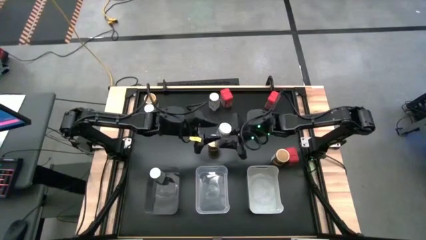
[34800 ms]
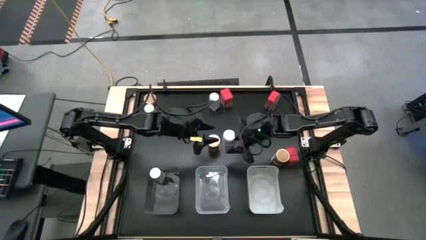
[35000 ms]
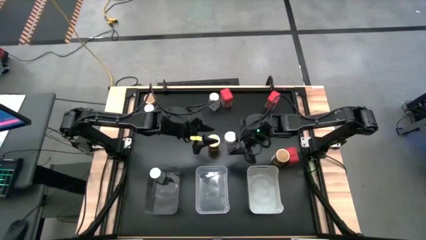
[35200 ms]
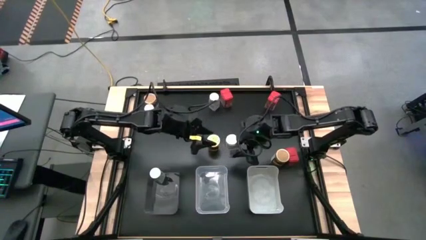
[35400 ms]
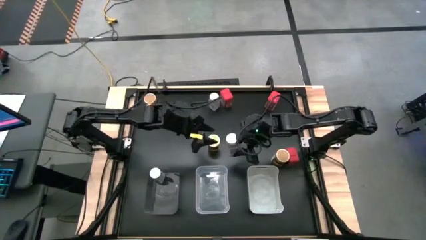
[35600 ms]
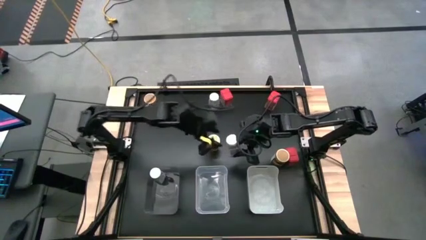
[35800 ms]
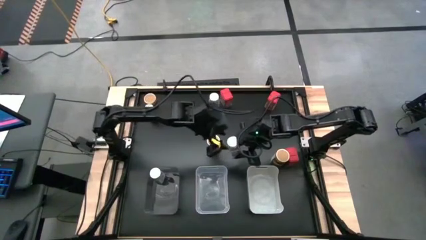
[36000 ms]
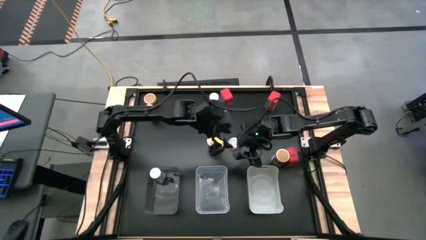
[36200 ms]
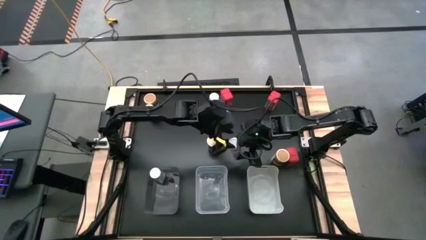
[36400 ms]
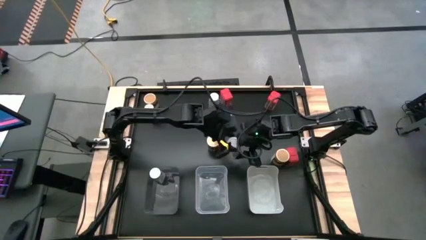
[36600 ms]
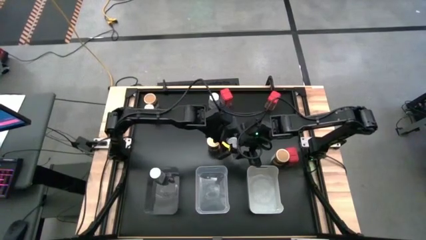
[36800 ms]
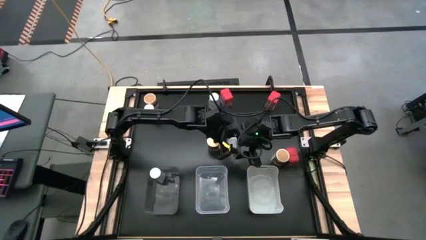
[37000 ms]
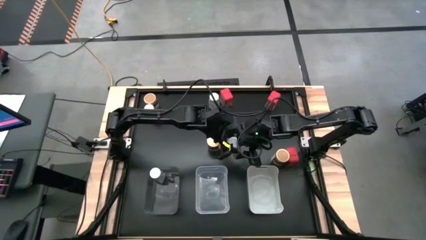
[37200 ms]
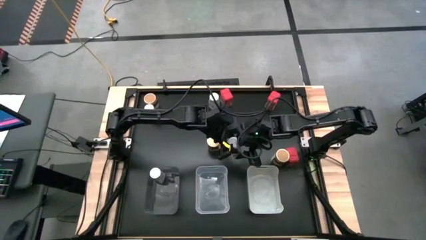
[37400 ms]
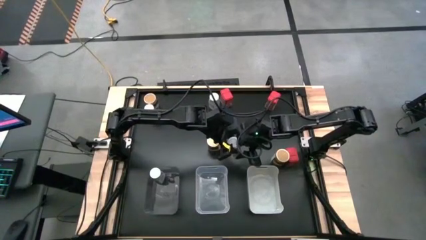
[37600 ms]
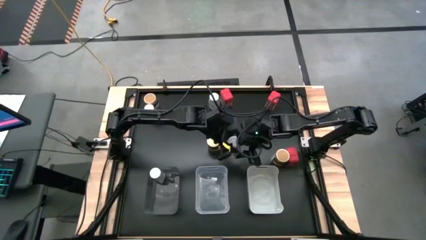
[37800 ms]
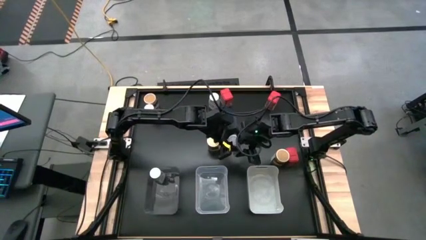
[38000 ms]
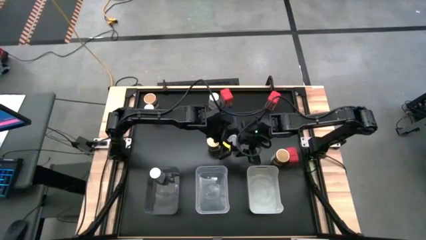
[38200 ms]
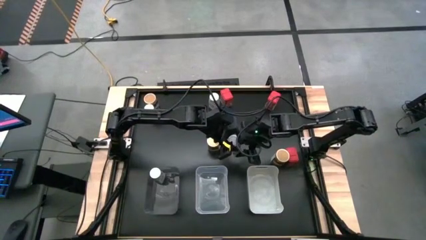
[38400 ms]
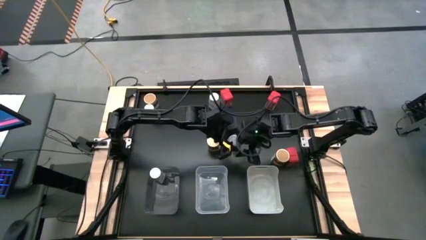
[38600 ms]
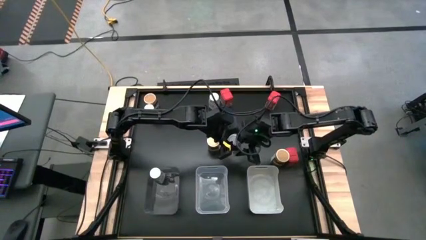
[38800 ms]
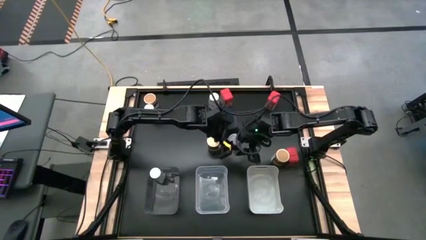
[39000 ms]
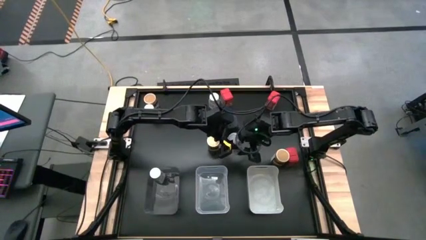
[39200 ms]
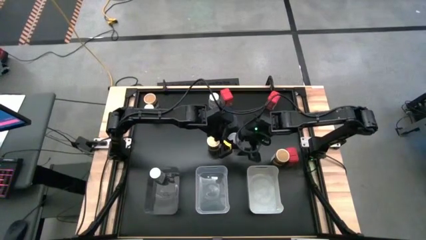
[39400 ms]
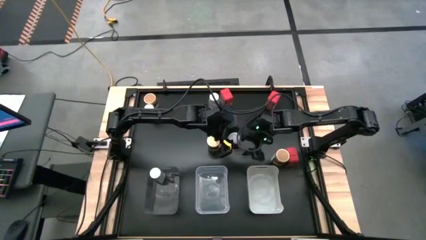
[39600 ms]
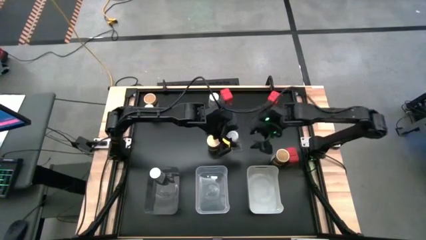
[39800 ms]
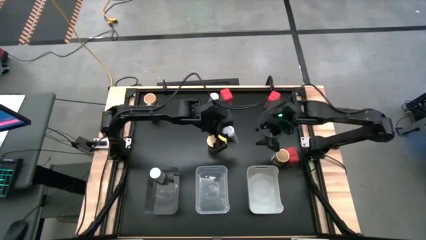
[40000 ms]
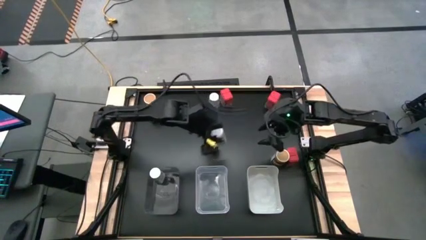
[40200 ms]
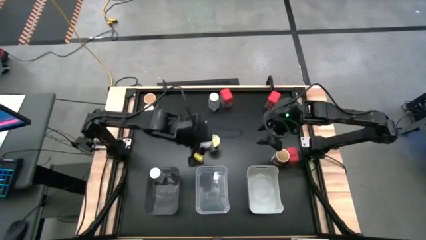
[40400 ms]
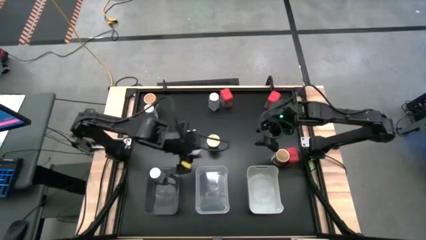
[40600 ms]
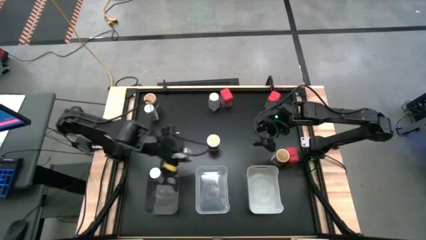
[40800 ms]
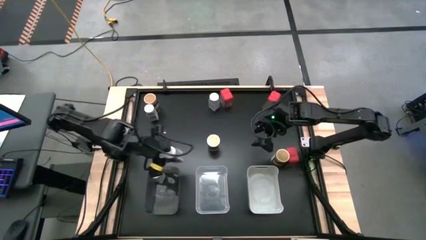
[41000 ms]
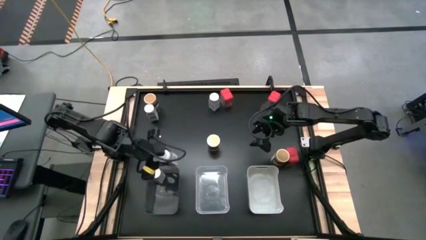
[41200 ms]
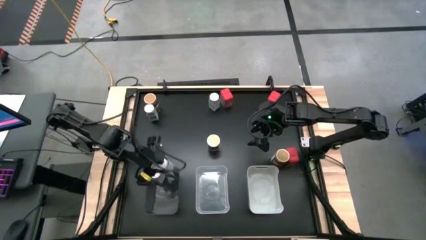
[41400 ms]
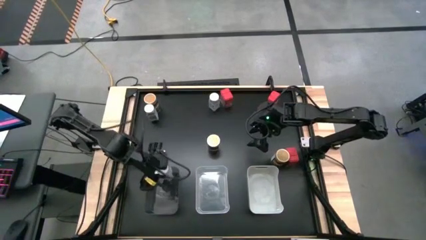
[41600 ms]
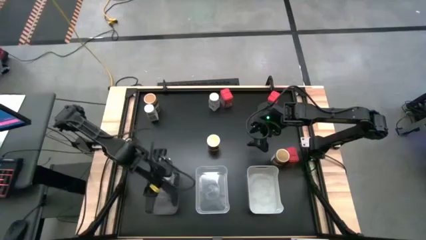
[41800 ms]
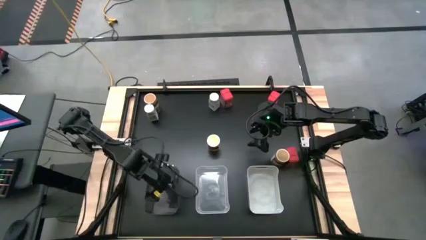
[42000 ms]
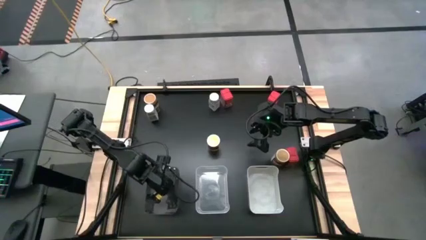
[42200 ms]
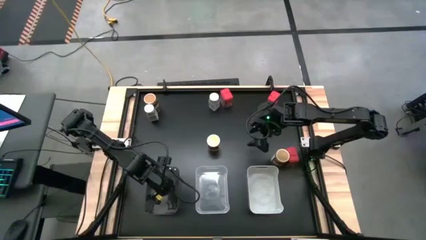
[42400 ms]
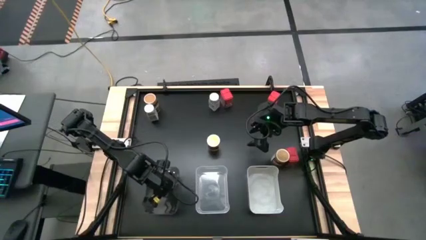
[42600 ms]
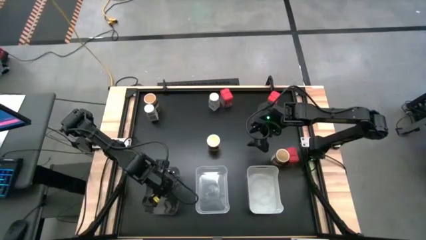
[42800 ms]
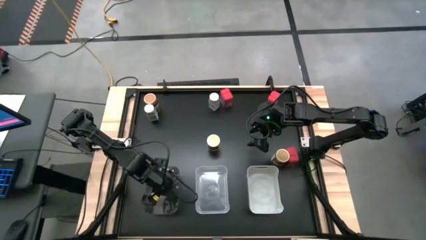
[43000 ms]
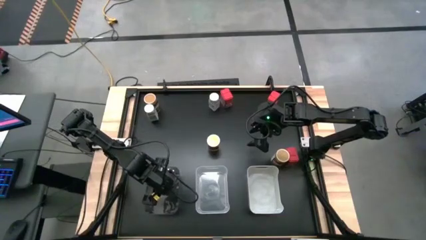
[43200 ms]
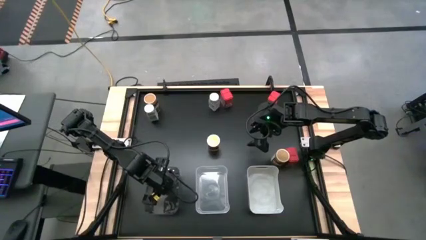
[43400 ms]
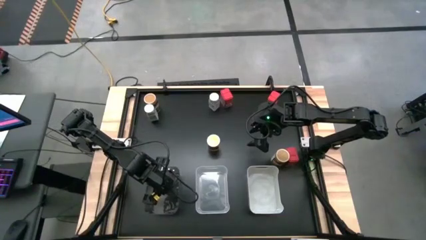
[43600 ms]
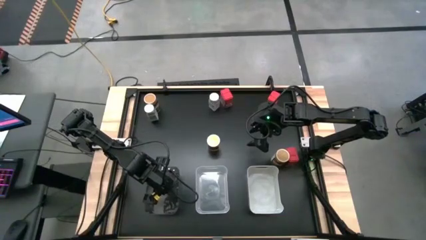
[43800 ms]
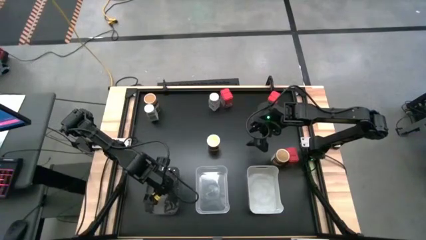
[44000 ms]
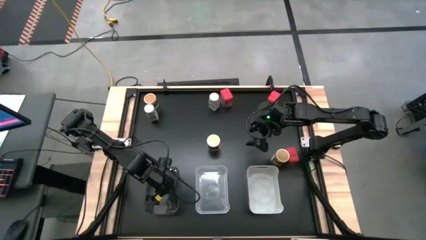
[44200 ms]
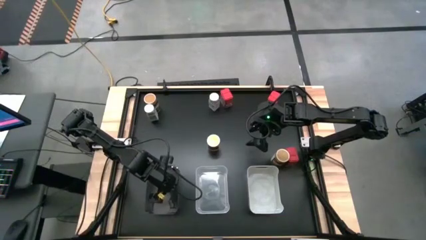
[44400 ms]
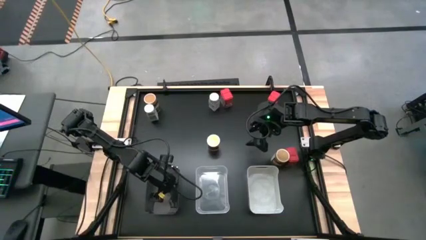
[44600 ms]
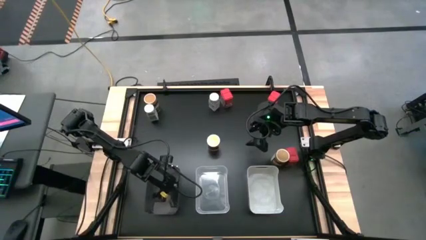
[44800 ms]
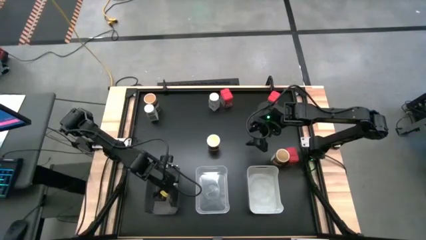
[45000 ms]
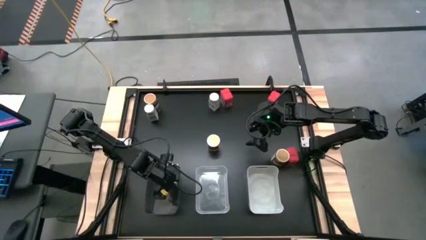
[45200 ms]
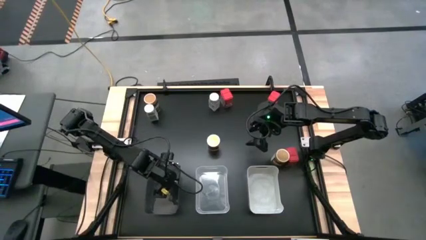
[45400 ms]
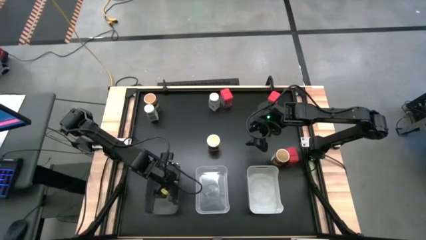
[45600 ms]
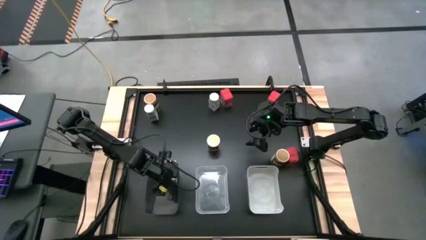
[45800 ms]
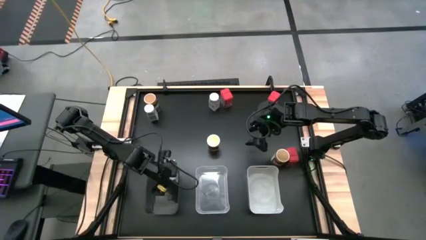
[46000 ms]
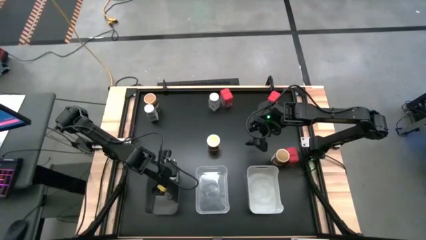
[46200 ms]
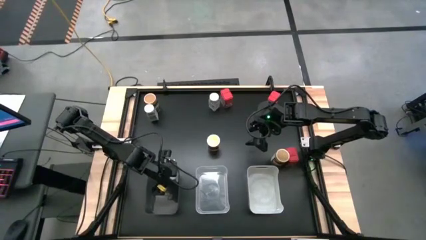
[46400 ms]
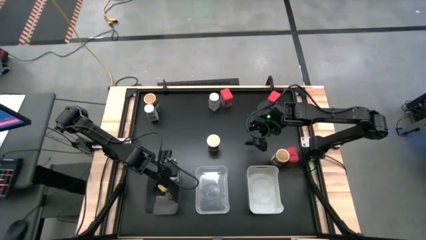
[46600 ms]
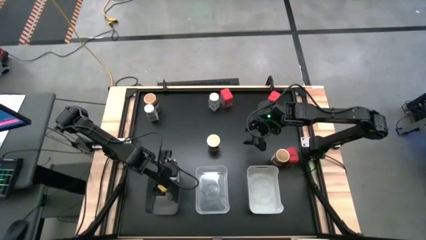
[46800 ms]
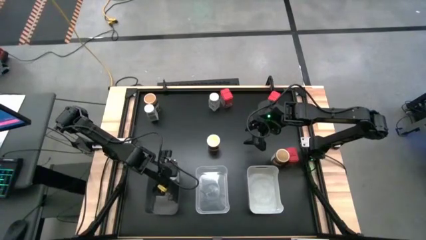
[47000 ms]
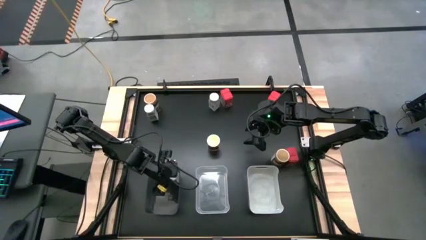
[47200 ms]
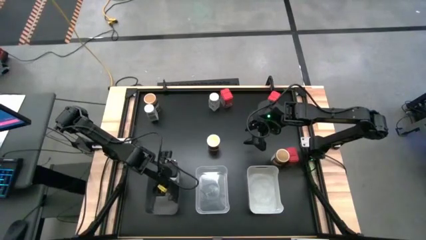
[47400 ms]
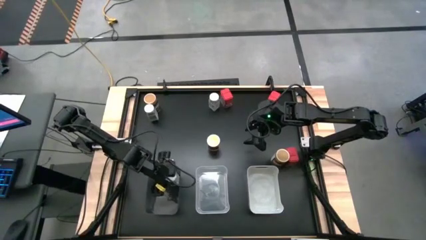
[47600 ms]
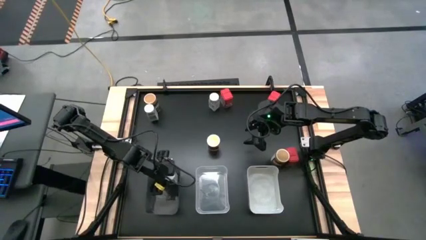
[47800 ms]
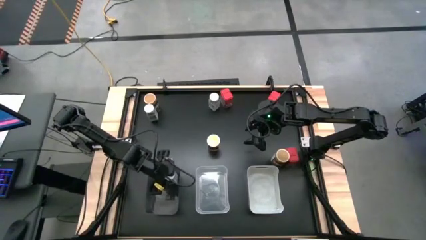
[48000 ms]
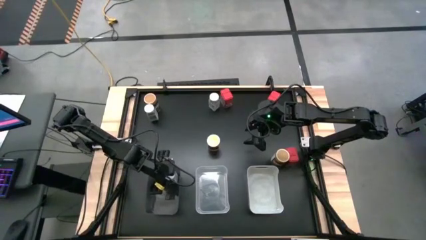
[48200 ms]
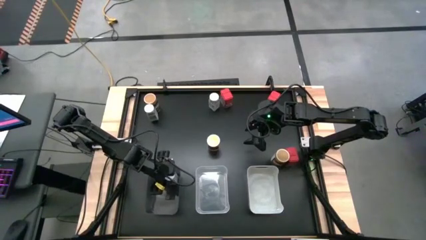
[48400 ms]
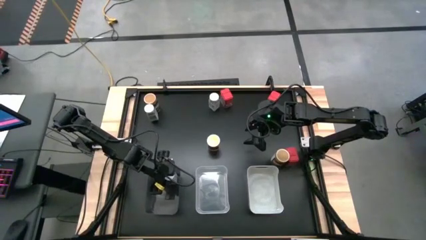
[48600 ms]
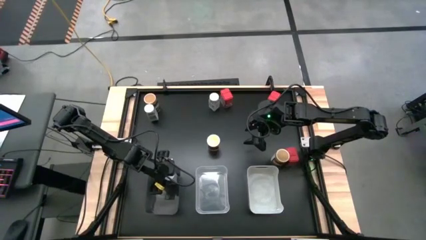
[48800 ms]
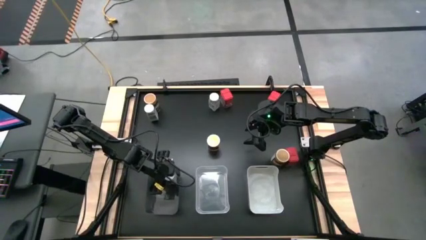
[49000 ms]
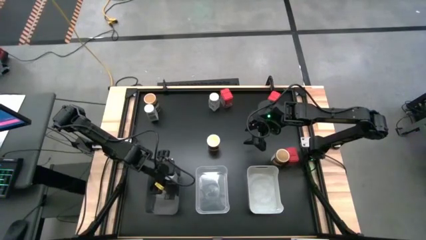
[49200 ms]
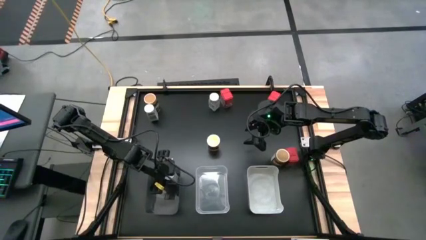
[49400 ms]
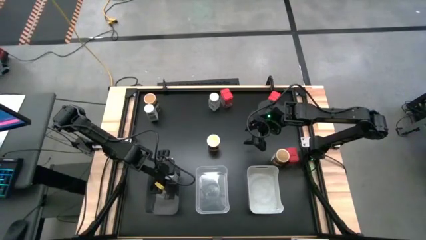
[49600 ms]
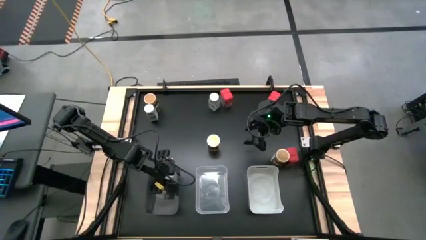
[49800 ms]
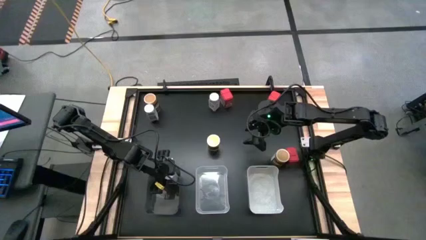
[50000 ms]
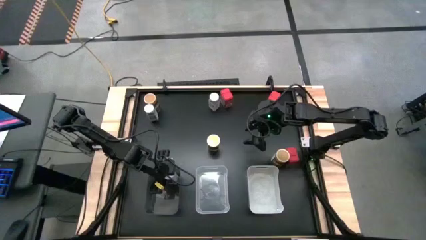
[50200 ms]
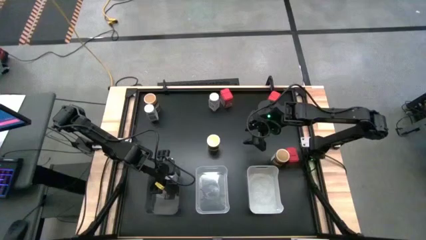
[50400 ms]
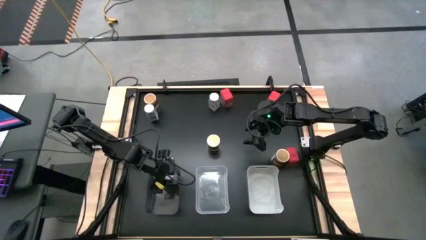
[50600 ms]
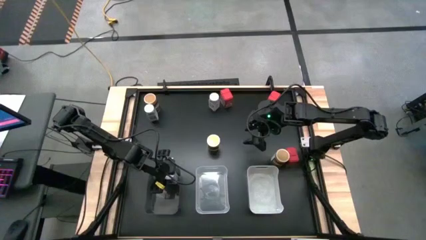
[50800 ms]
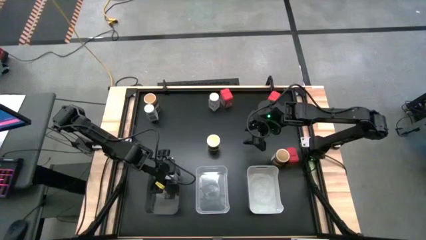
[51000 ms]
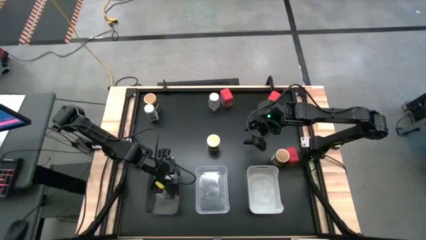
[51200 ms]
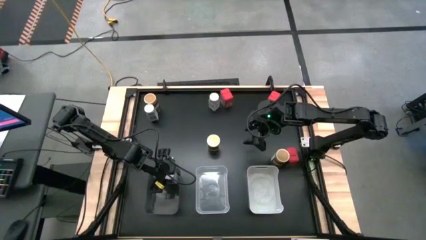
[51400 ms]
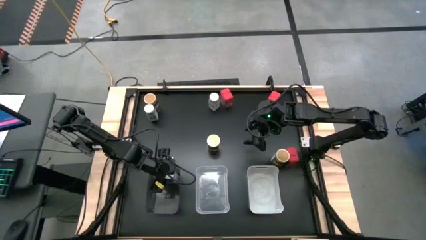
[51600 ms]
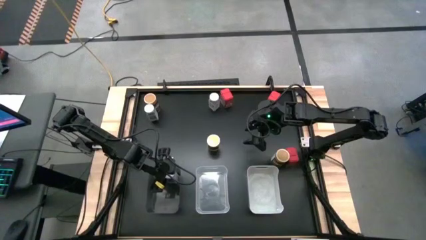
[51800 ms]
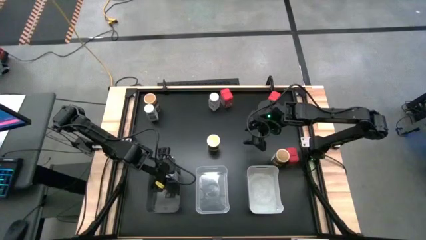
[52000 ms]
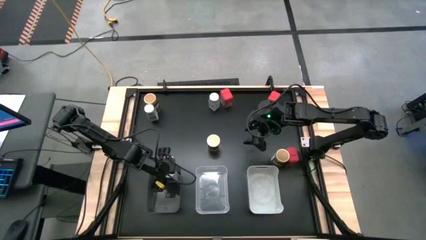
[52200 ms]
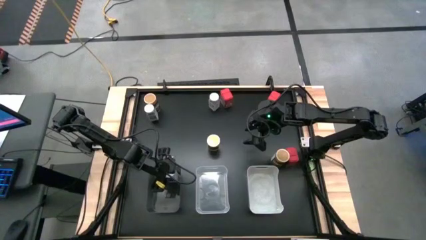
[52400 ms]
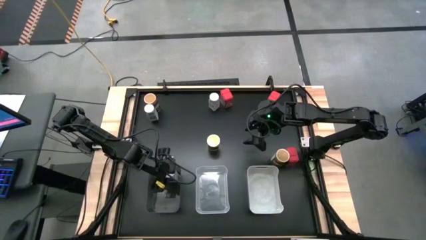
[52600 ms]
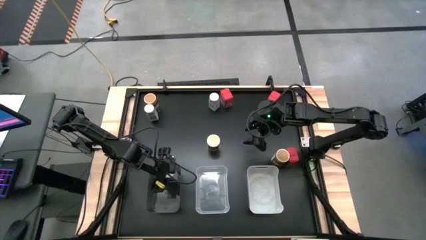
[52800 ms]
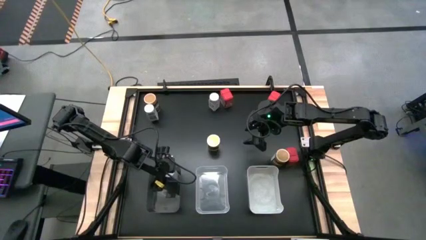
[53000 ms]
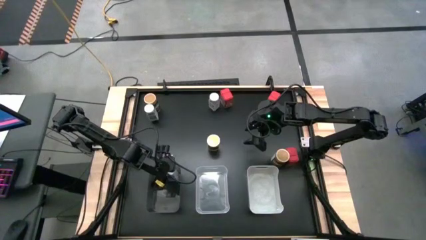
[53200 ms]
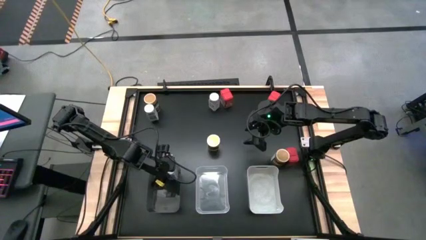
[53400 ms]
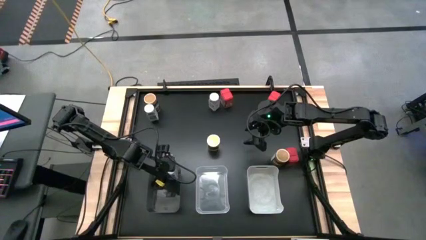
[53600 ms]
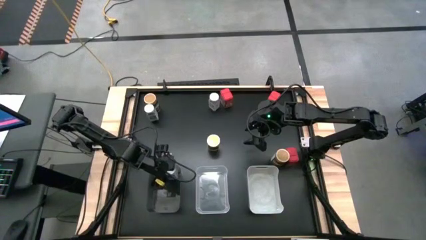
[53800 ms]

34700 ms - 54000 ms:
Task: Sort spices by type
Put the right white seasoning bottle into the black bin
